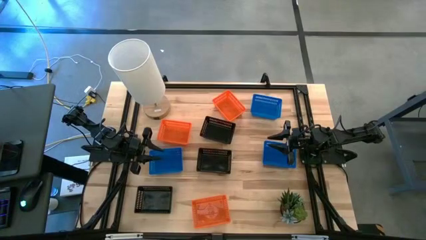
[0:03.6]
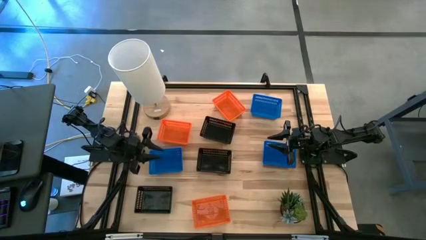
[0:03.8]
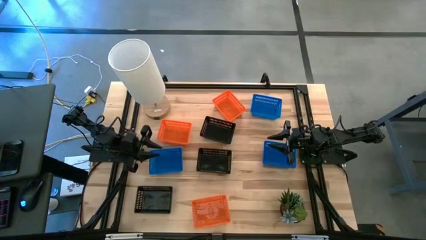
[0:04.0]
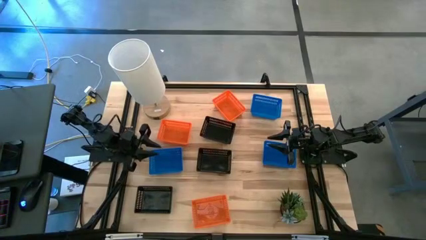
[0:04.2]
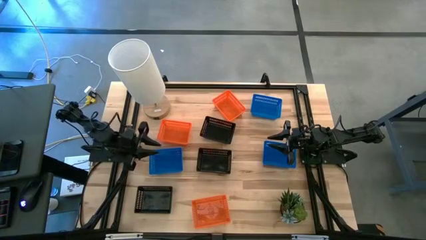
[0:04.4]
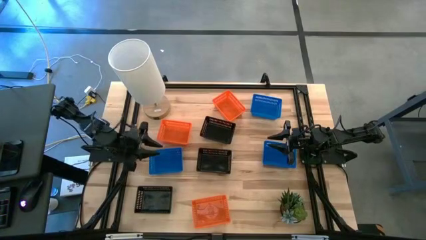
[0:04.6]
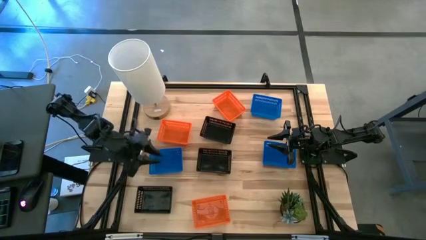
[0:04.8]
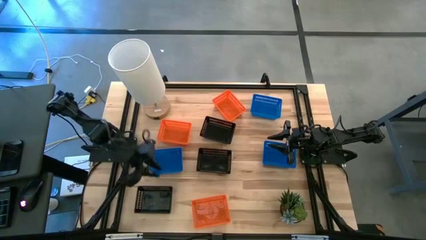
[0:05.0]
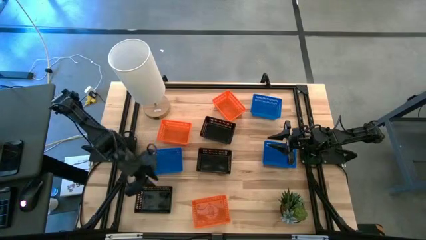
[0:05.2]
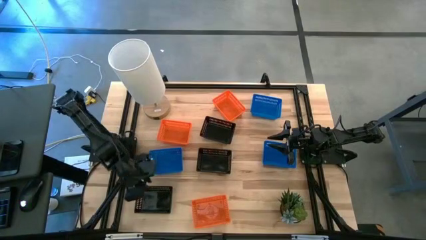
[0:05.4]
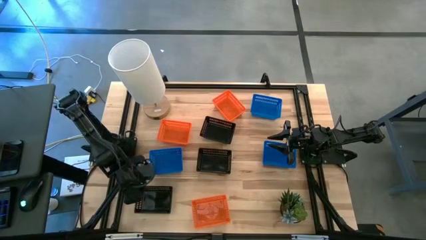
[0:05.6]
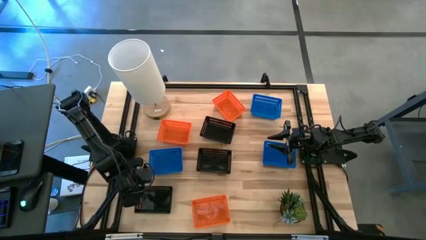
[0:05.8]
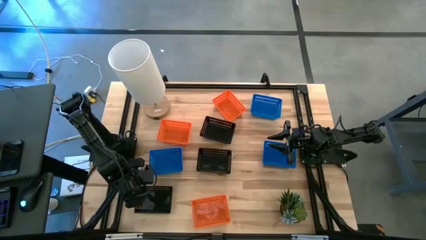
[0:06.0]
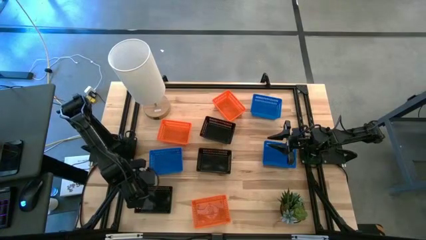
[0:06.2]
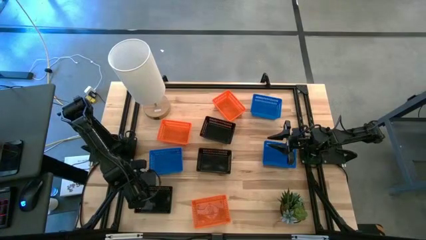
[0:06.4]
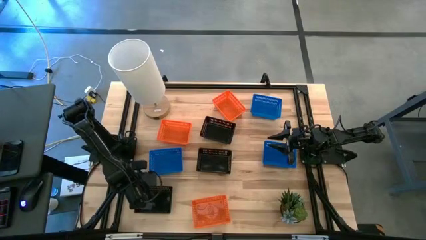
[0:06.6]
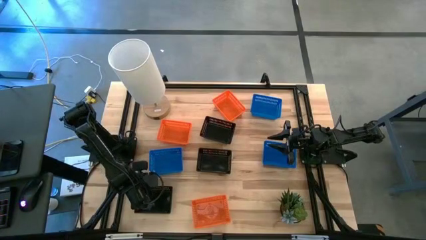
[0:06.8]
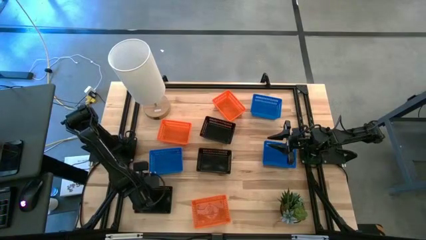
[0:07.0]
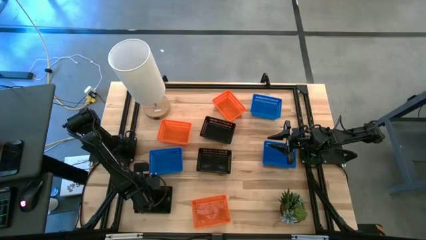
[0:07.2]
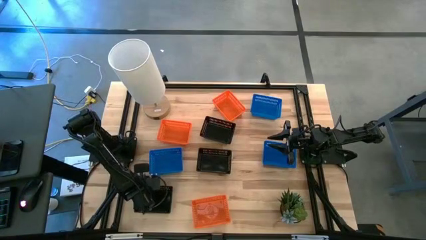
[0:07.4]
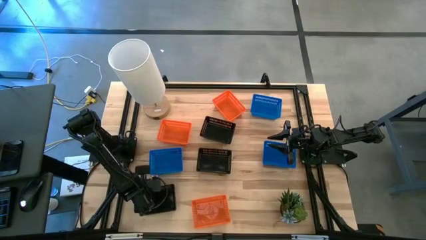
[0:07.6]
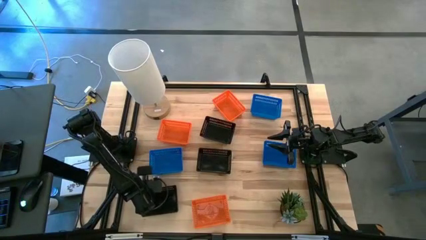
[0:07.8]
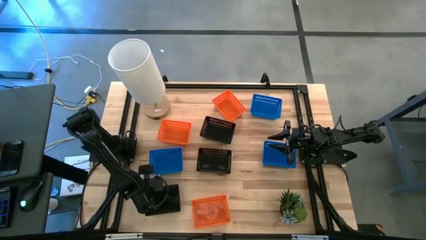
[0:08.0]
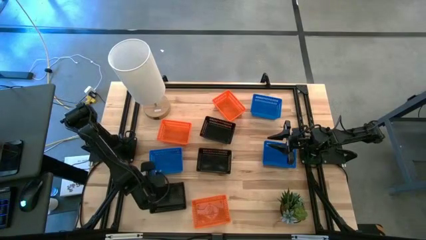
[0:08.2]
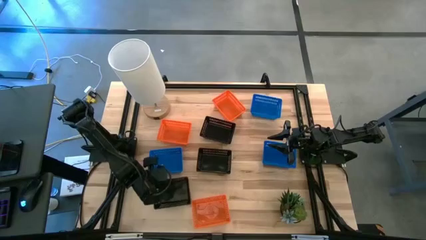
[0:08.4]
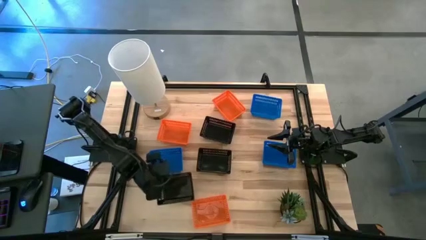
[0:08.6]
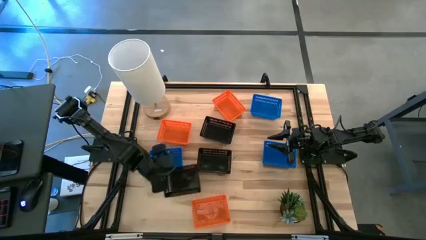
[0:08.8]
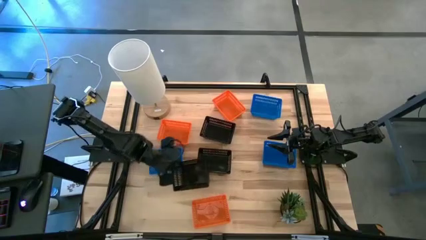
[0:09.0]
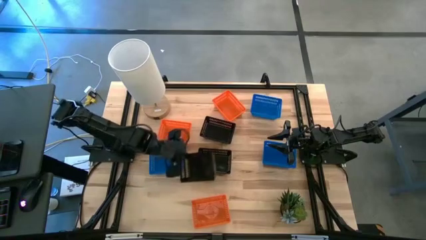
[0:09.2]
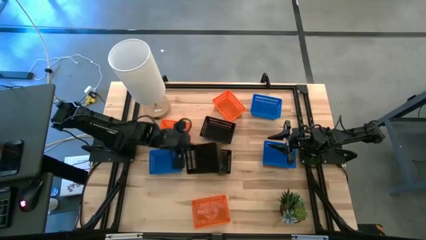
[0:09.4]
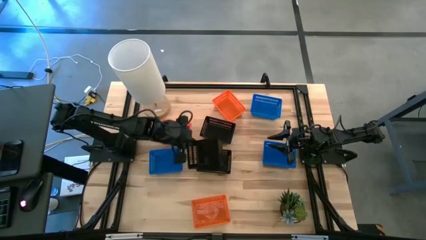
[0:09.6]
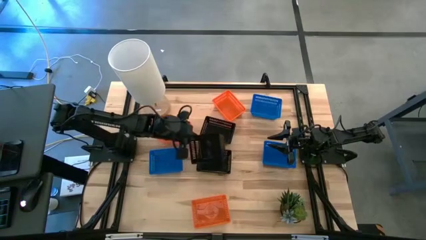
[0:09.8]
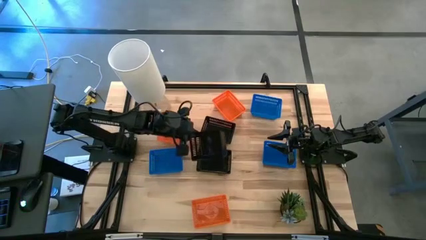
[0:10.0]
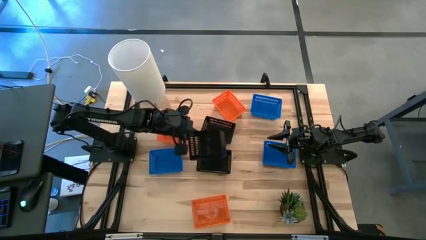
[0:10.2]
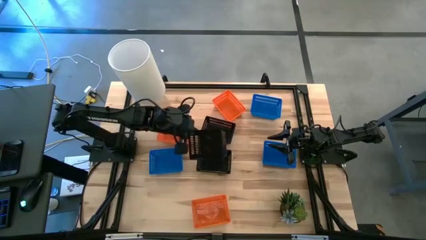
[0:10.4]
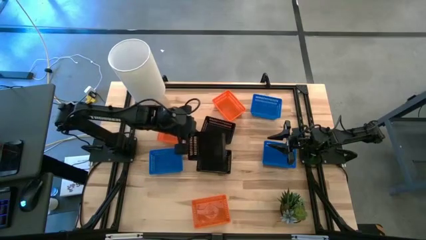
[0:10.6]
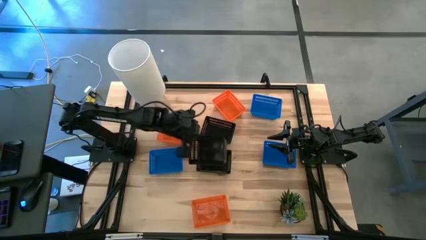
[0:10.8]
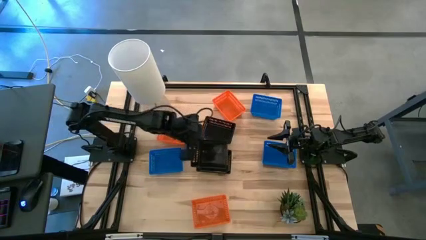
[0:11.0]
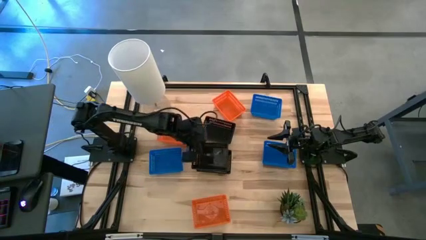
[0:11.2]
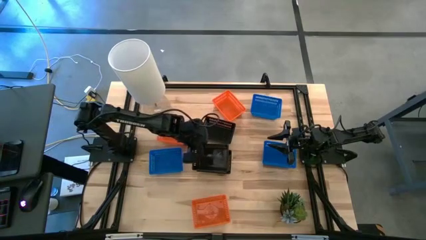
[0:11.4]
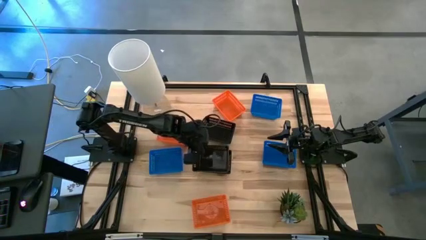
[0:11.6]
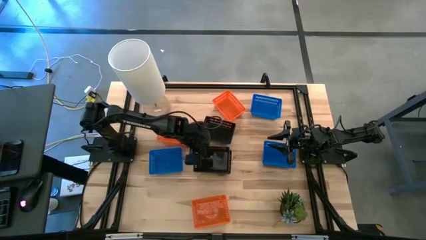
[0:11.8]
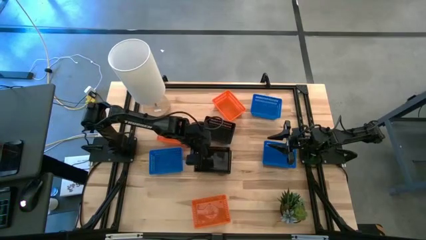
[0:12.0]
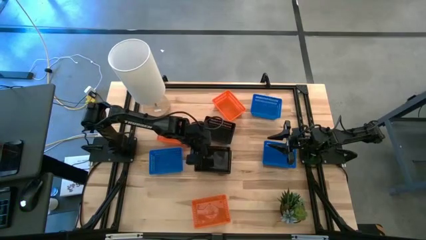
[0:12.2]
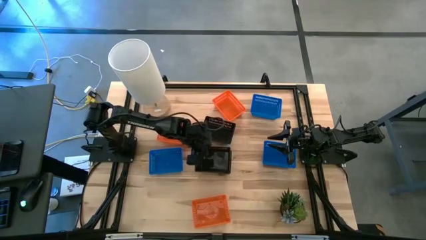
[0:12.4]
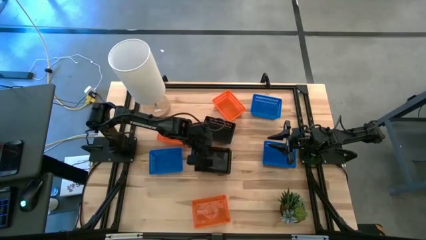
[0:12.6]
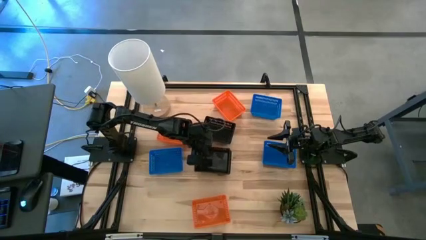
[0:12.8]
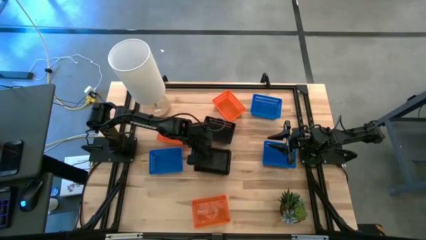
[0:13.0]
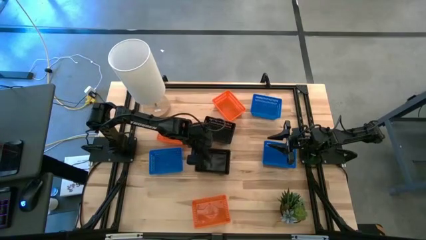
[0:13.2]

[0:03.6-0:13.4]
Stack the left black bin on the bottom right black bin

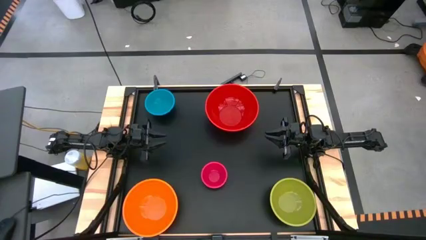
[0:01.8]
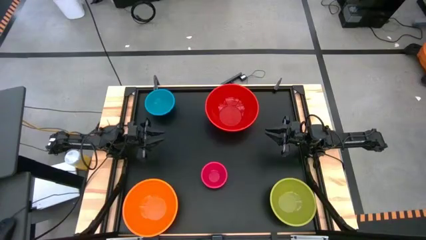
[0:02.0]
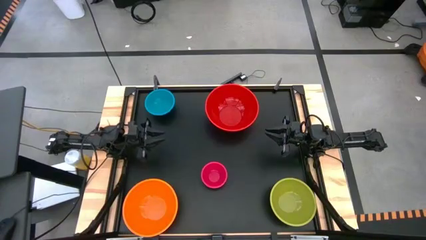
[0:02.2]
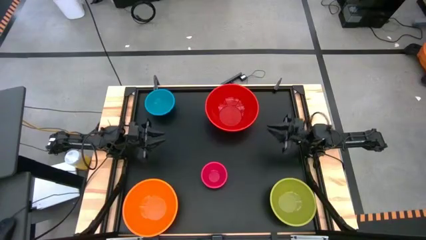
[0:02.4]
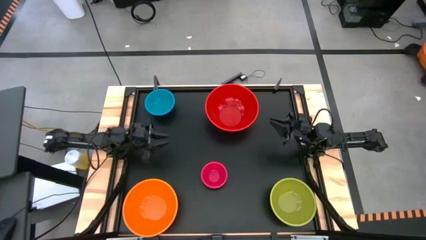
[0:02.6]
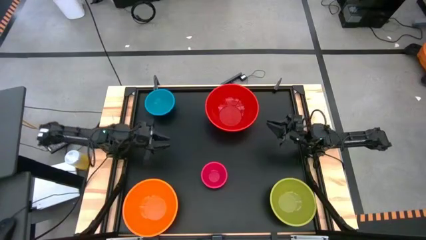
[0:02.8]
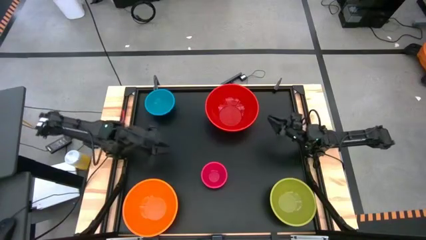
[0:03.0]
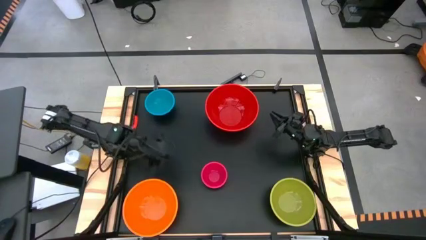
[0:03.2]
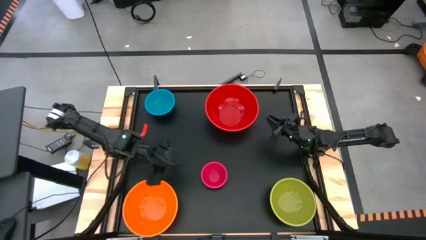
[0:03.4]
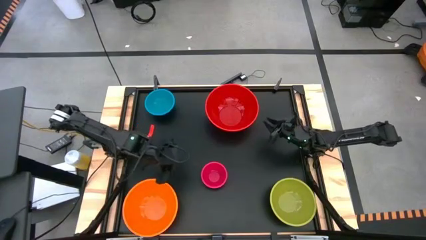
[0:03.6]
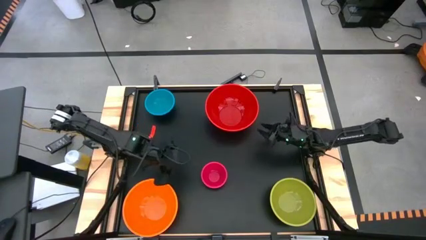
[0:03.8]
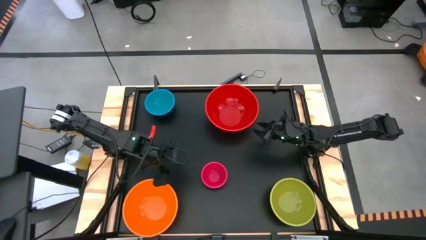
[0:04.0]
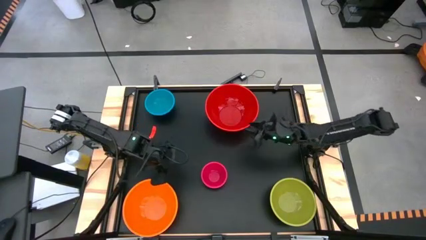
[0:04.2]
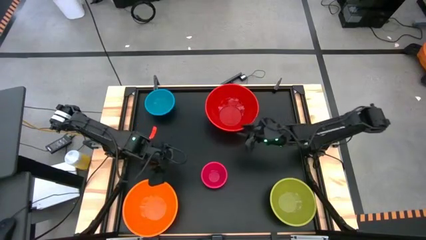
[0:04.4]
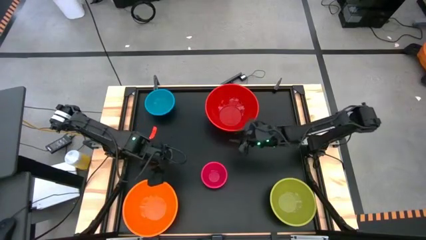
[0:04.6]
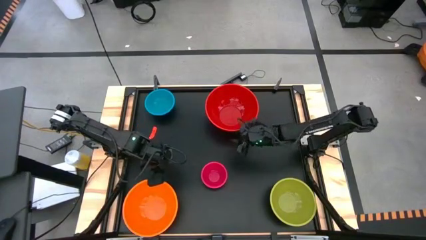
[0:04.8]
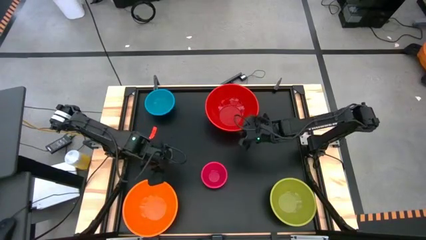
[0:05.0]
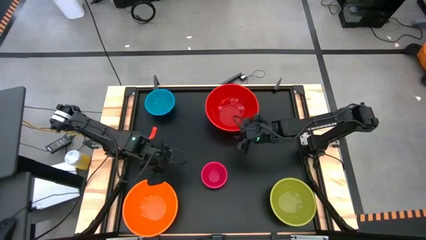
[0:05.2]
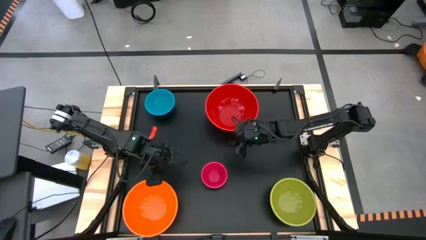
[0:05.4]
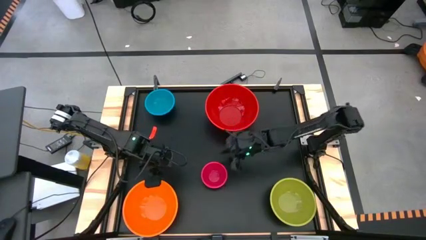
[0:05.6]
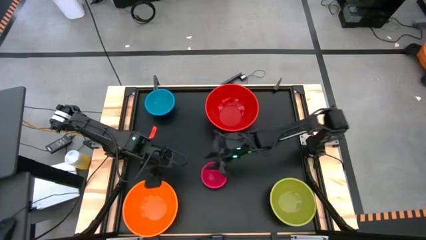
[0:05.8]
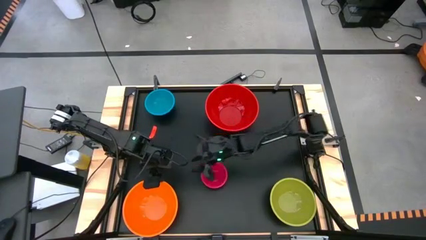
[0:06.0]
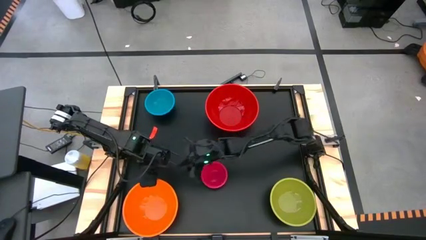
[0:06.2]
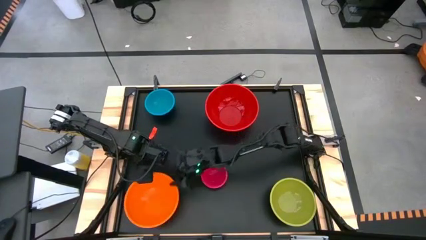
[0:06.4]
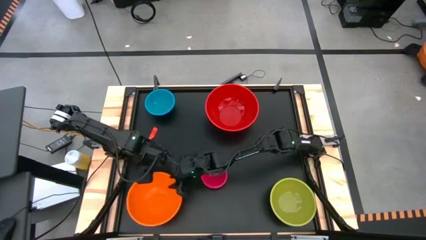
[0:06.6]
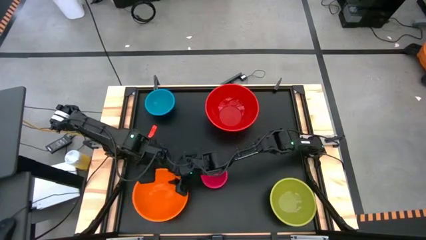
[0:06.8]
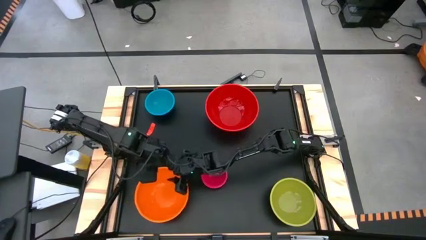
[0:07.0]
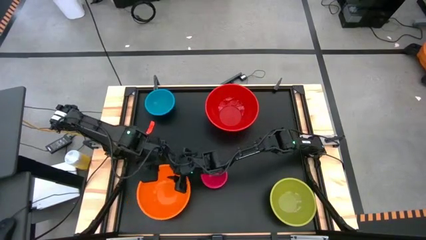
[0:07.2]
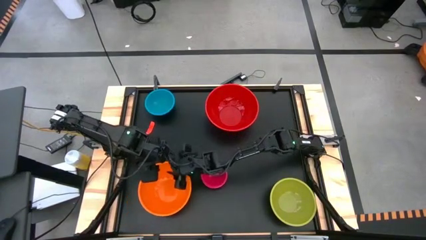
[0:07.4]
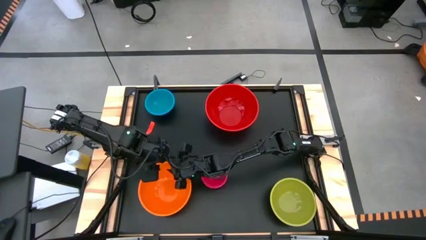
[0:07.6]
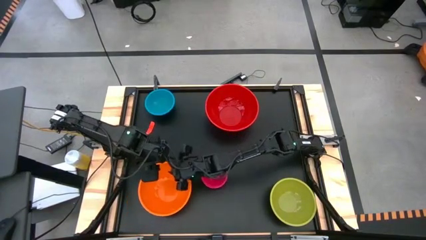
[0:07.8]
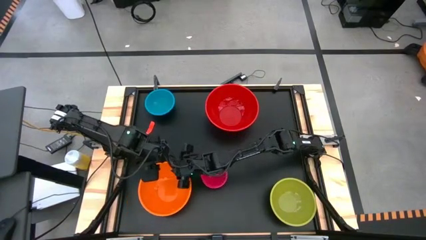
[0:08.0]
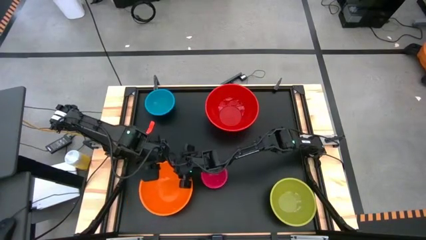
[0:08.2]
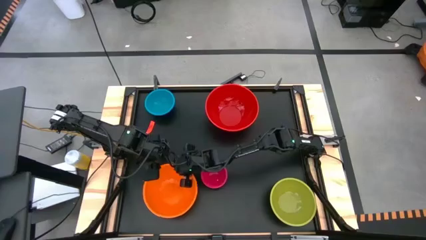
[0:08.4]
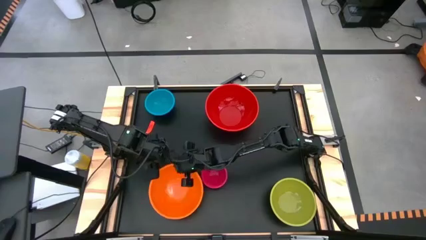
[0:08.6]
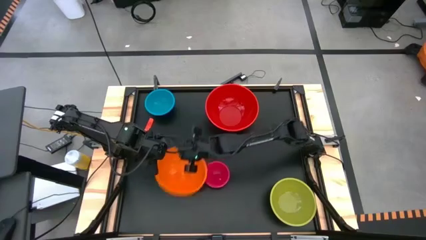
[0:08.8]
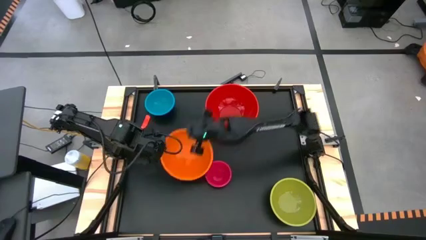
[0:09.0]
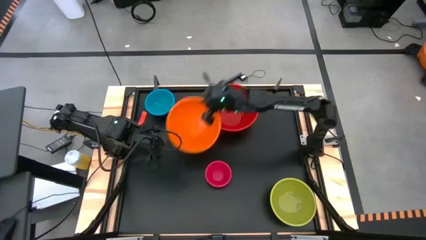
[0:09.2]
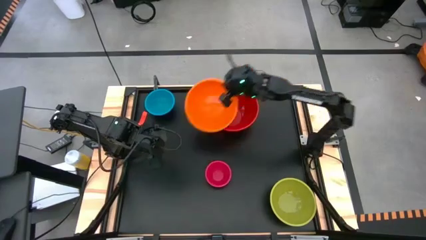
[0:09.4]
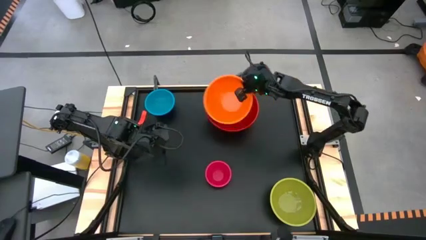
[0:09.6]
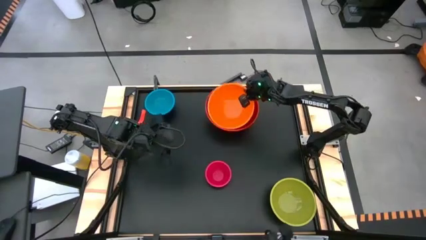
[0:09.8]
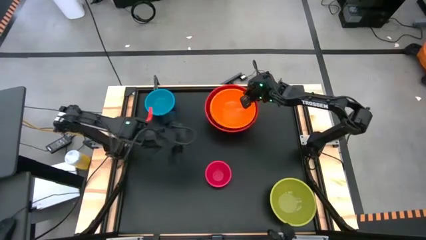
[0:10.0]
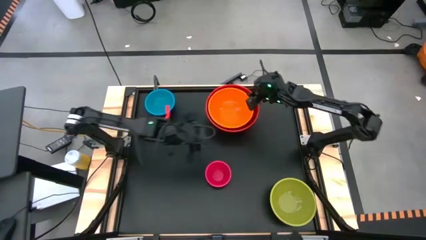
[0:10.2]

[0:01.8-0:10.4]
Stack the orange bowl on the large red bowl
